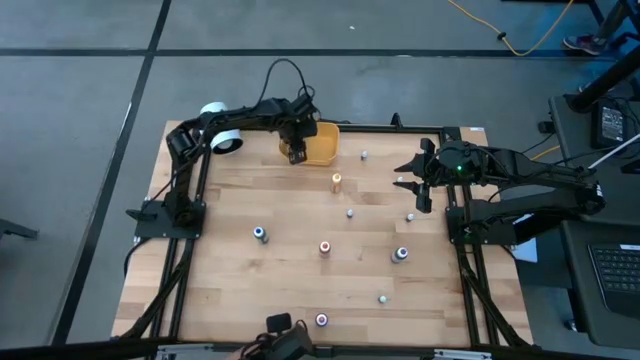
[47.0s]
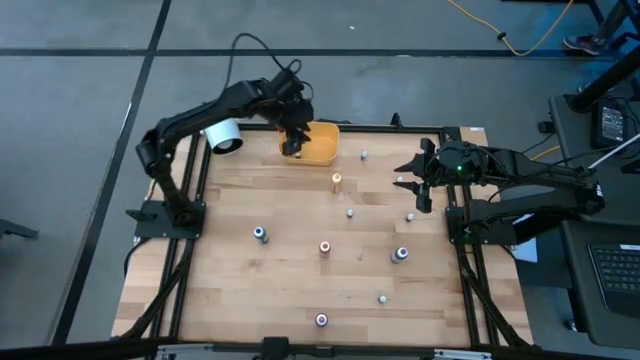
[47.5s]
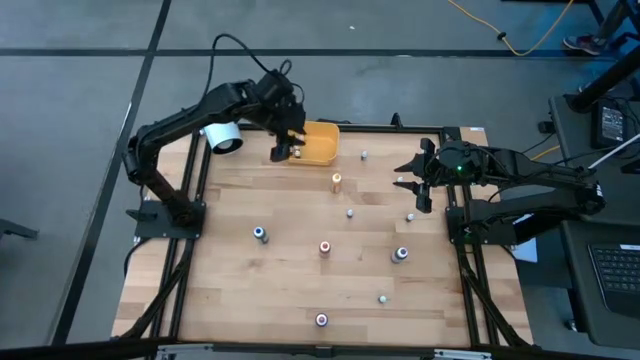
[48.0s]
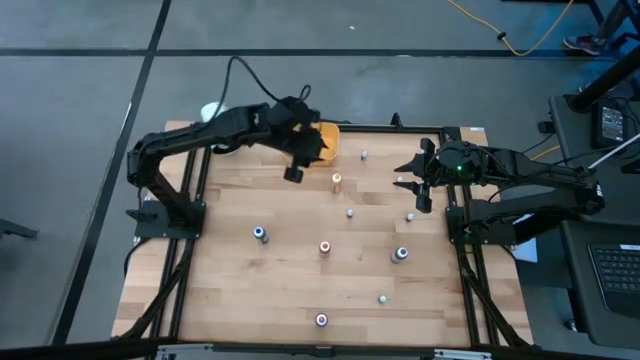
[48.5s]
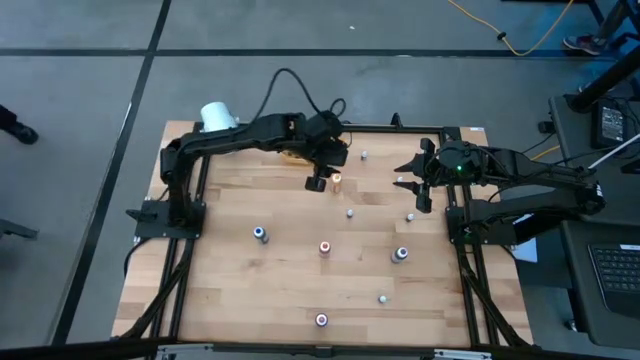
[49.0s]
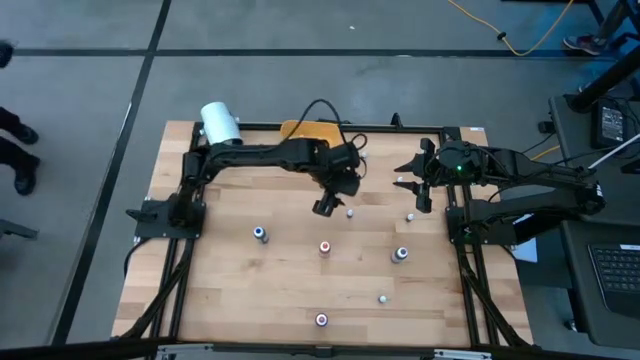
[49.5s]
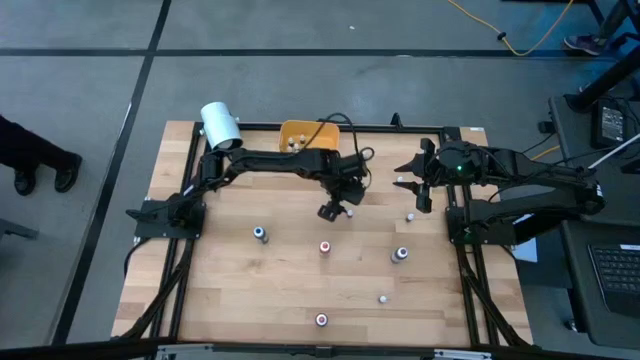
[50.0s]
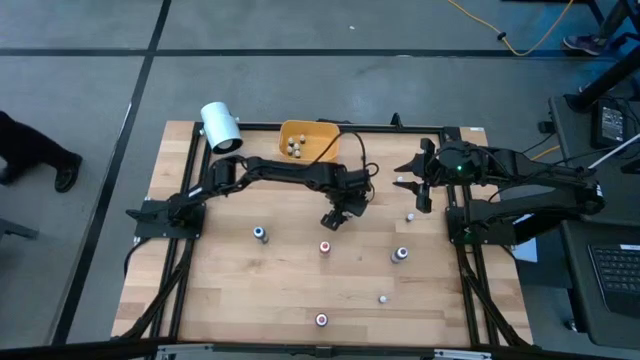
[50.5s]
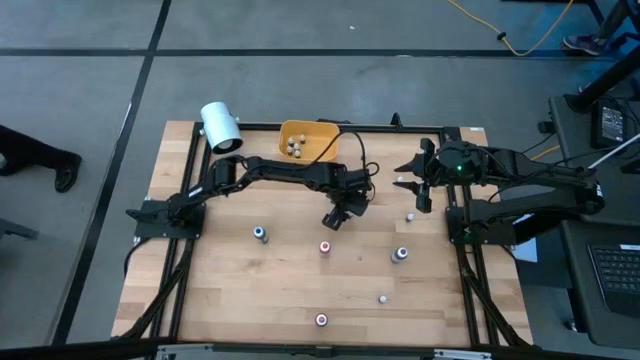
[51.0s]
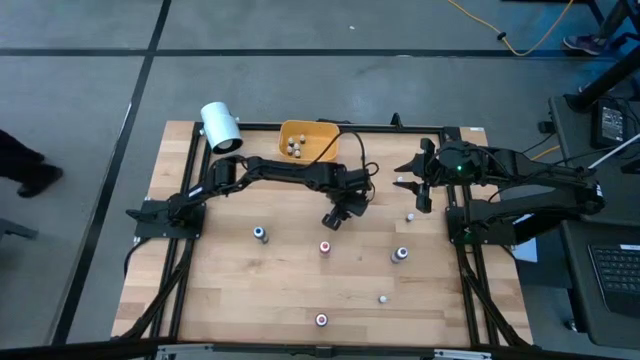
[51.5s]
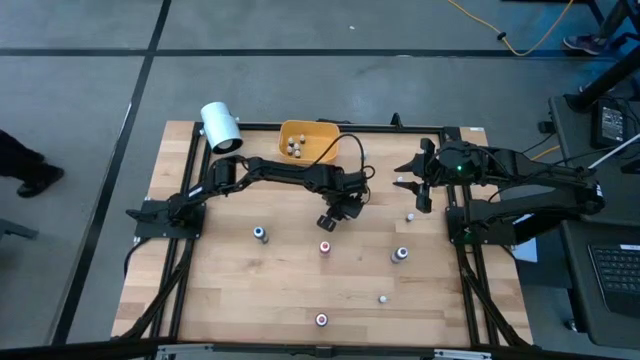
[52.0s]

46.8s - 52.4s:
Task: Pick & Place food coloring
Put the left red food coloring bottle into the yellow bin

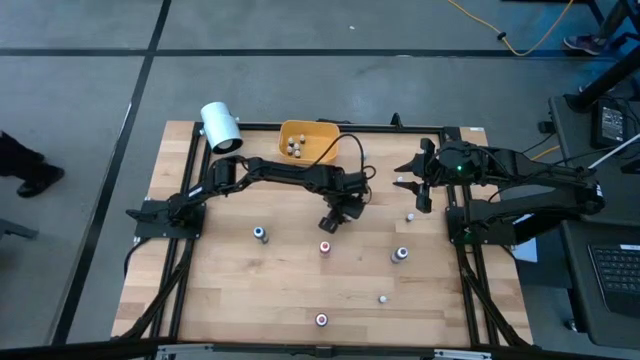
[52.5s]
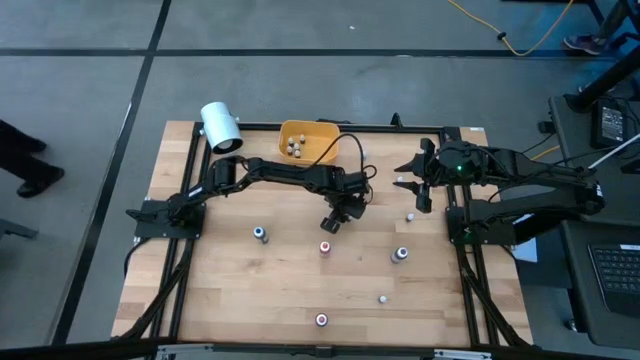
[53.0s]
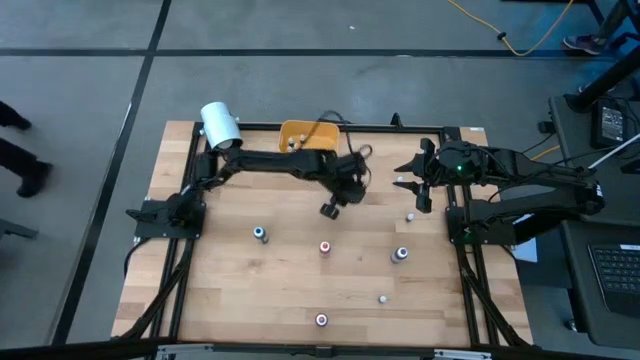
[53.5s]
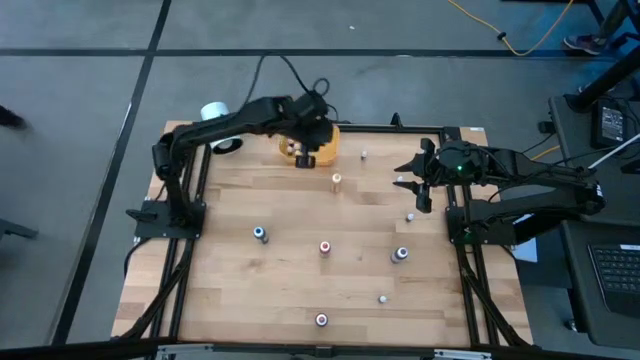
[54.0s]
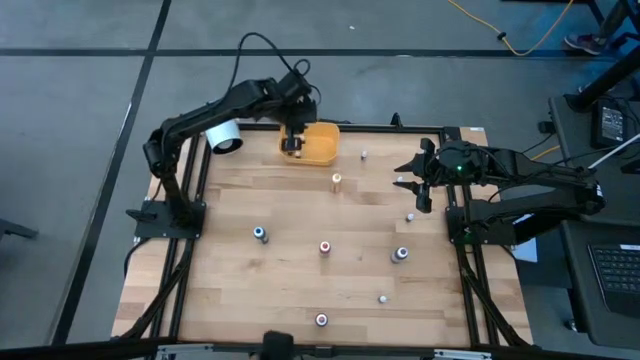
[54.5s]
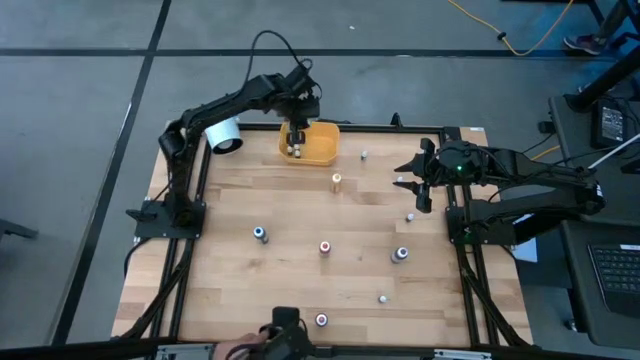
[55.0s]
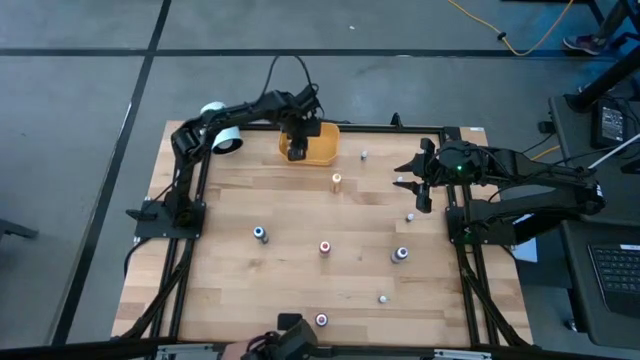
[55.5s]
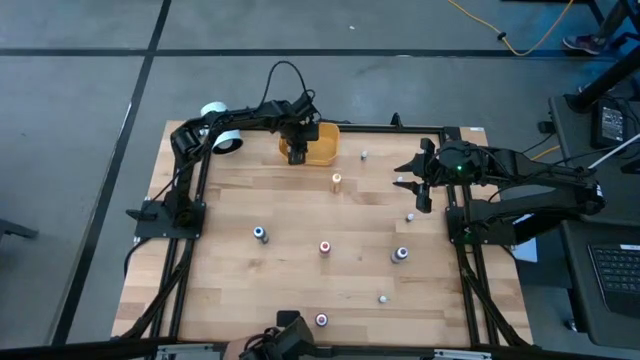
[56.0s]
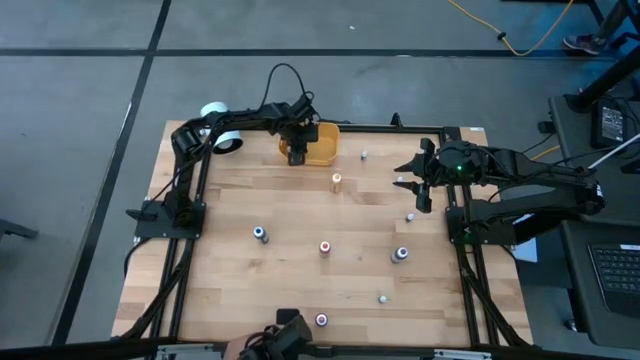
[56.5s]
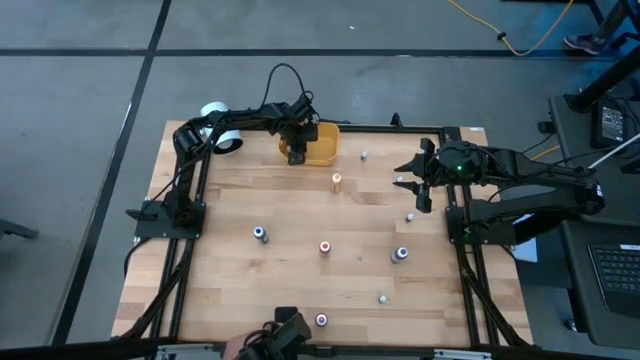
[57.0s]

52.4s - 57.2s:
Put the left red food coloring bottle into the yellow bin

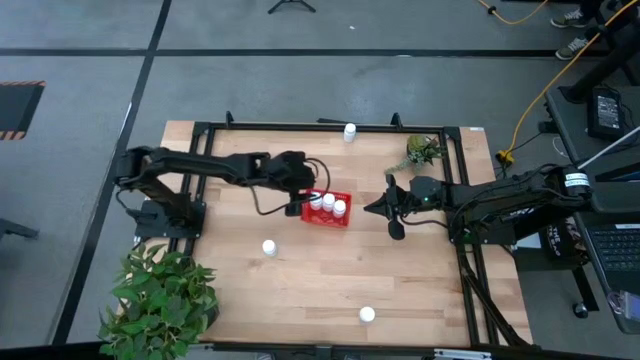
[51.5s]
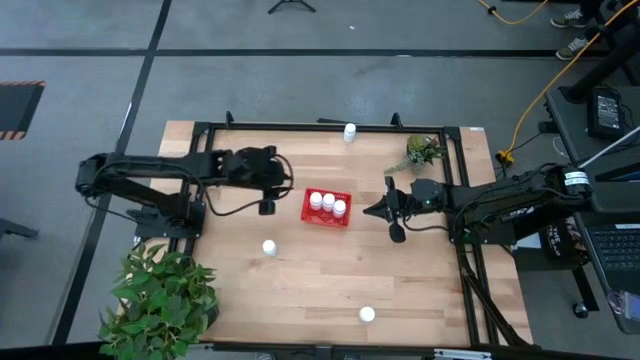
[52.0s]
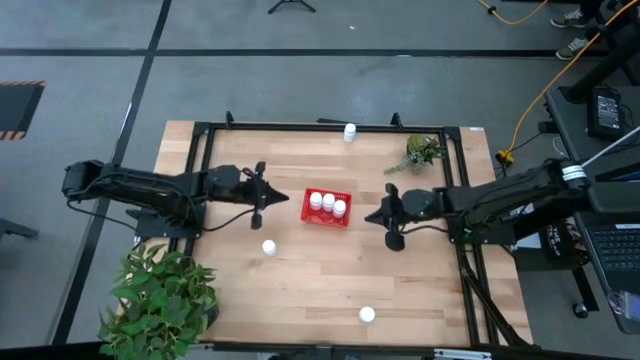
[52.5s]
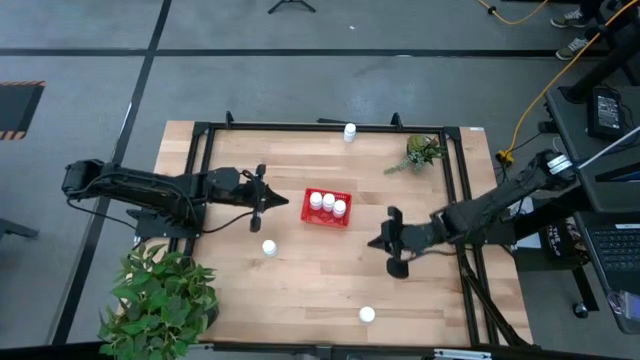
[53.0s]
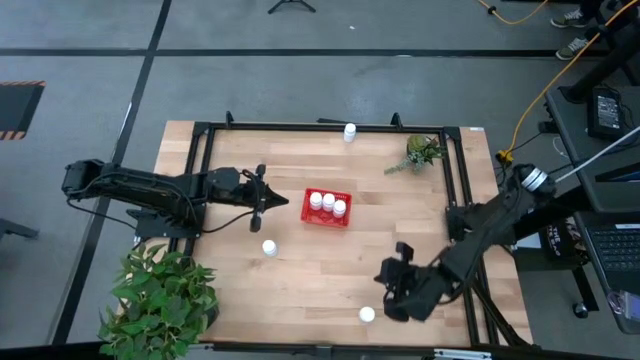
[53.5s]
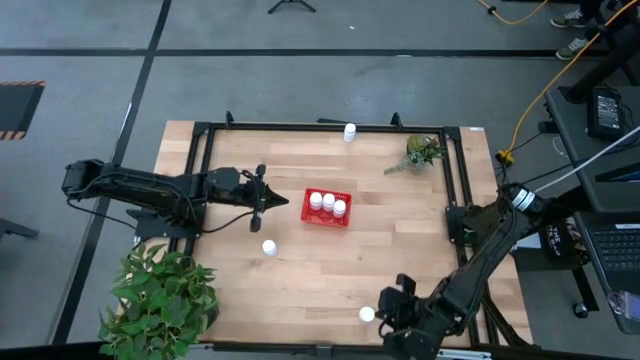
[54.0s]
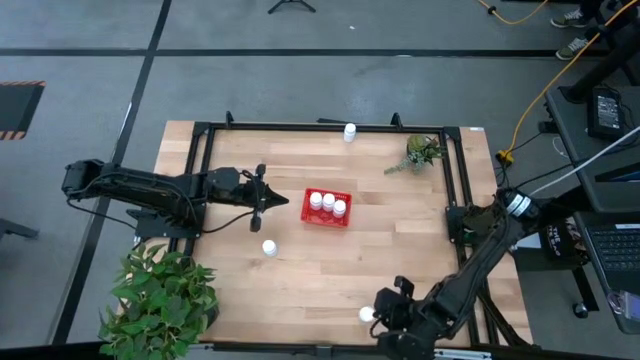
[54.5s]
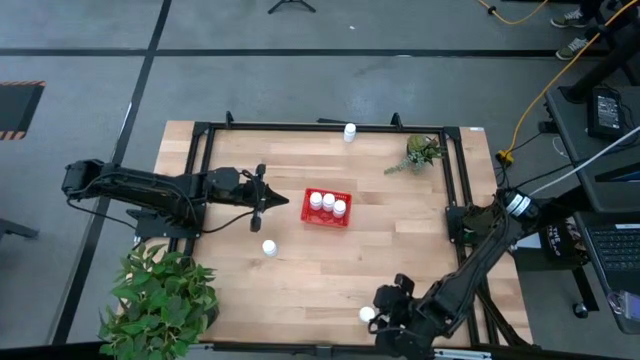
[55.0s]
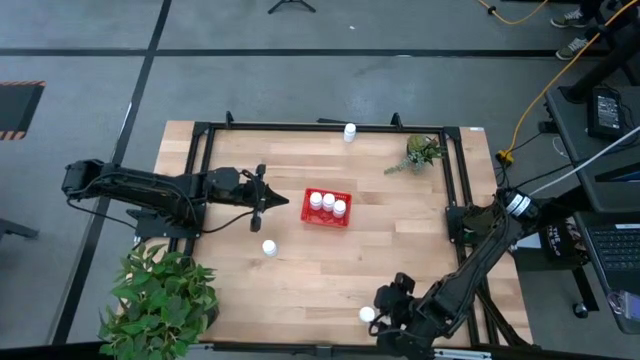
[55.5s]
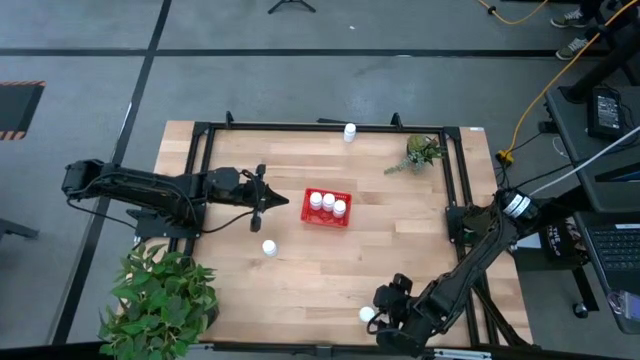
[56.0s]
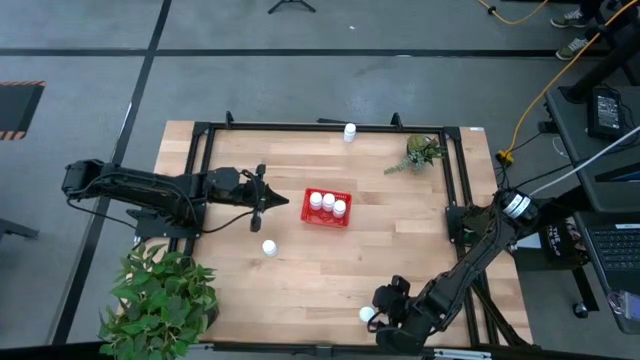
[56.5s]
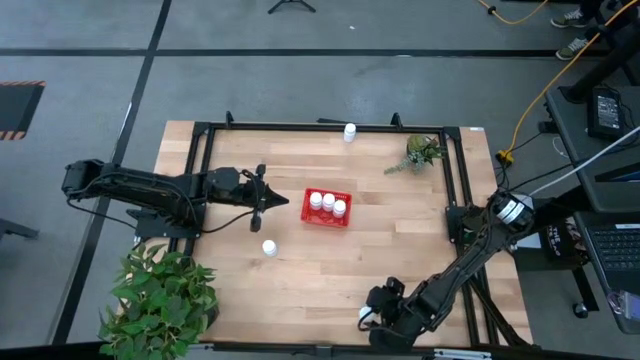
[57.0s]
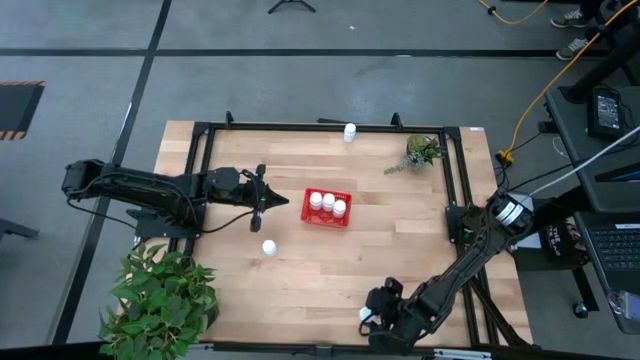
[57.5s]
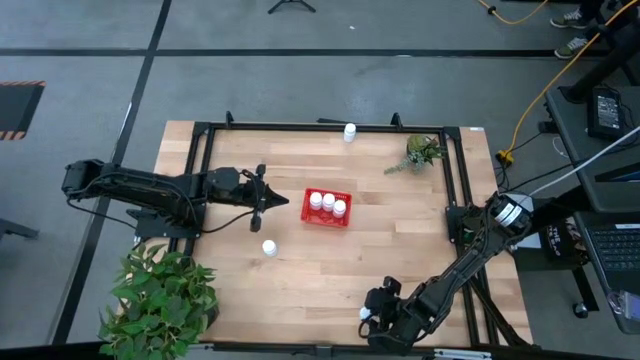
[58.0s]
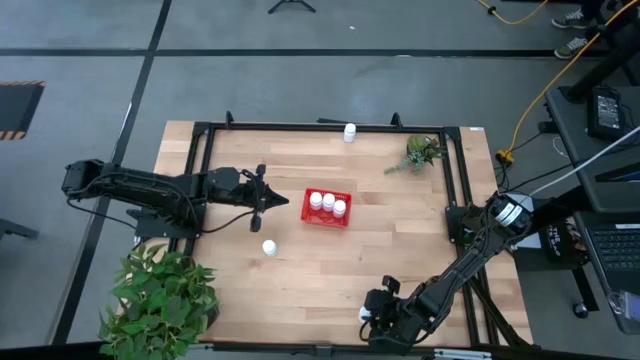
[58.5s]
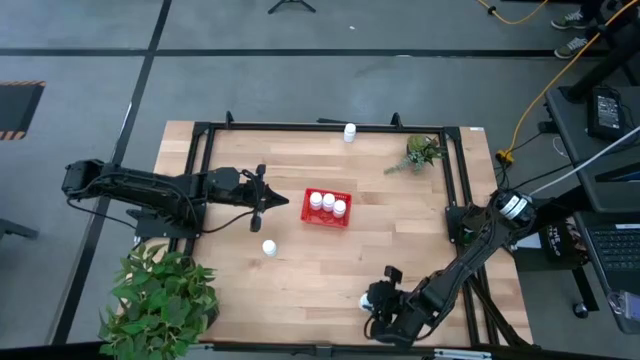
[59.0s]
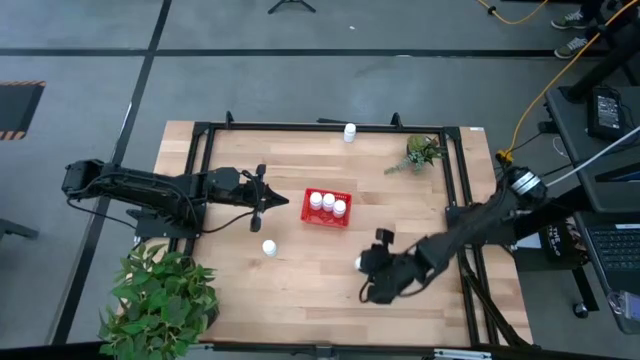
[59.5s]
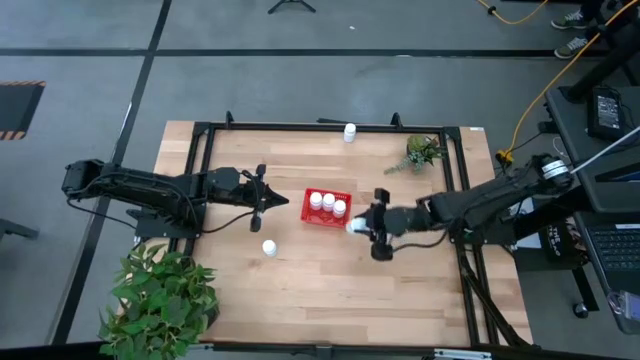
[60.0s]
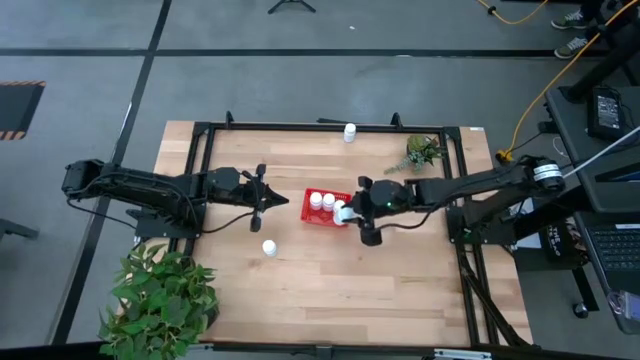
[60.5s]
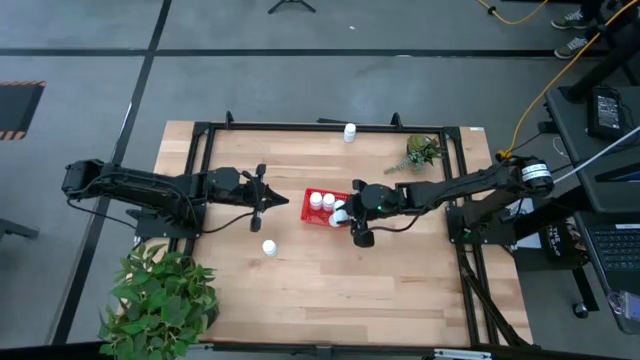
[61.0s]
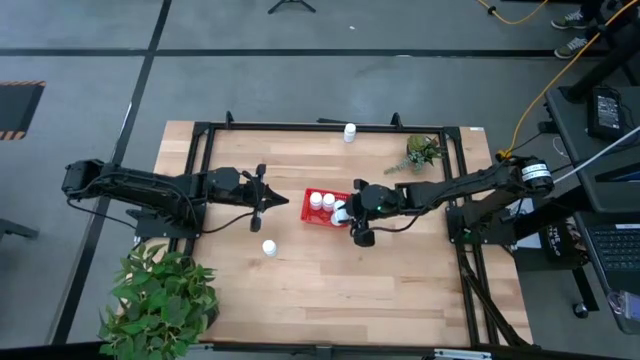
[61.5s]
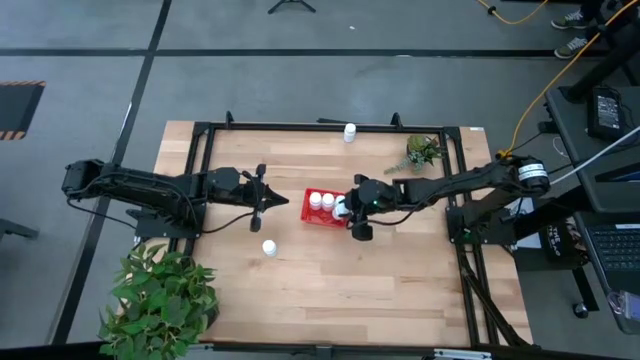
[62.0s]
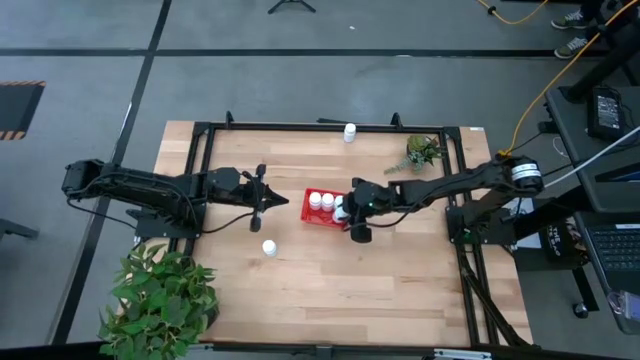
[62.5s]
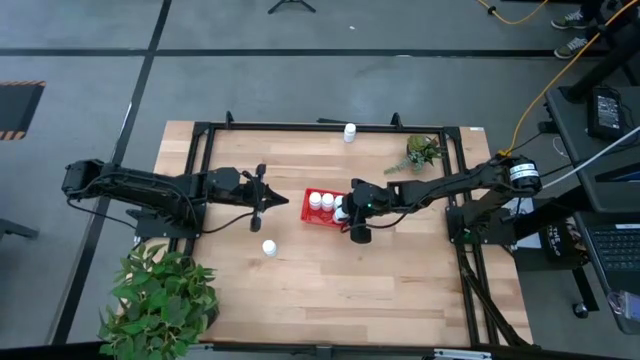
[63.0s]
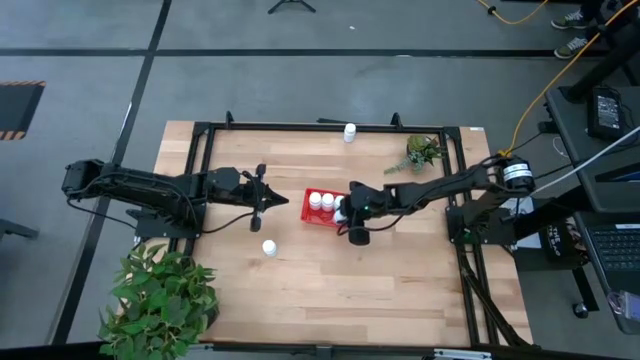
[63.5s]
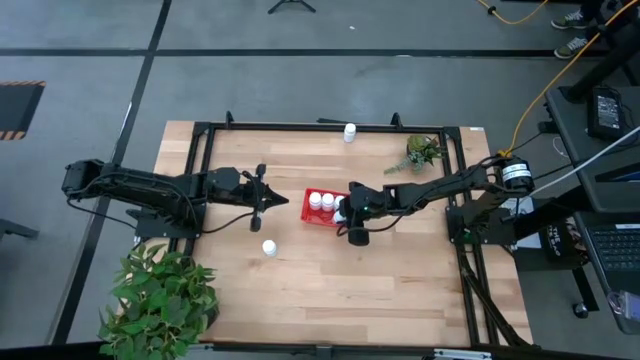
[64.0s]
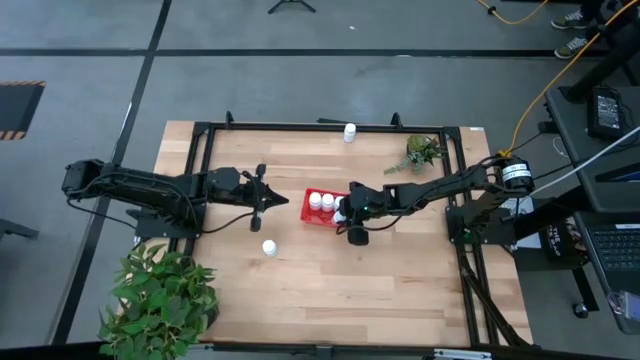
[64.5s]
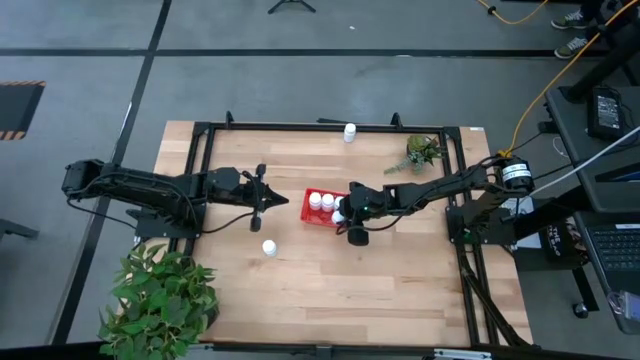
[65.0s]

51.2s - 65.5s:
Task: Pick and place pill bottles into a basket
Put the white pill bottle into the red basket
